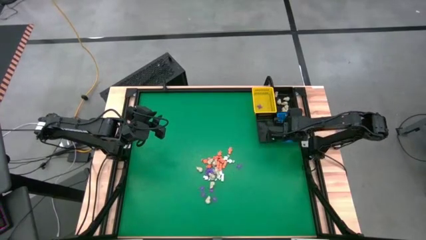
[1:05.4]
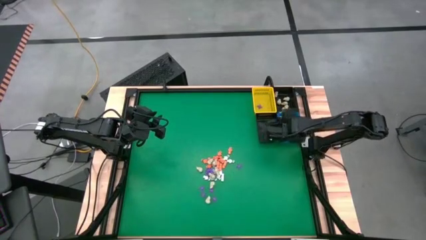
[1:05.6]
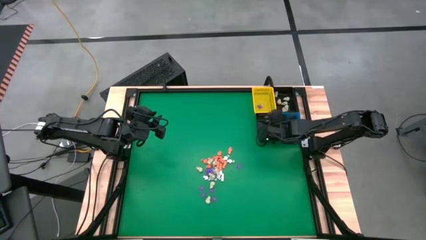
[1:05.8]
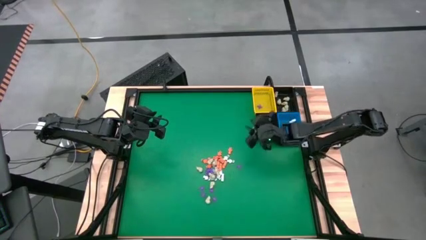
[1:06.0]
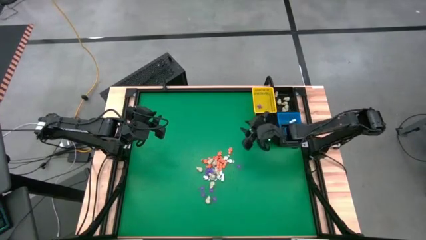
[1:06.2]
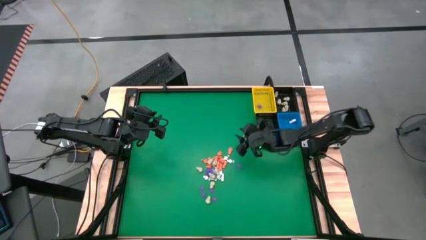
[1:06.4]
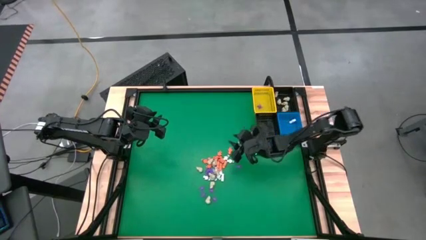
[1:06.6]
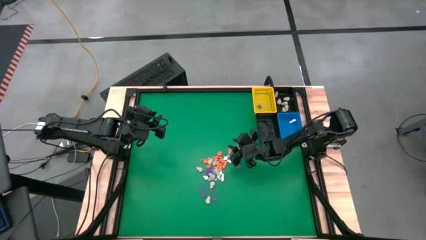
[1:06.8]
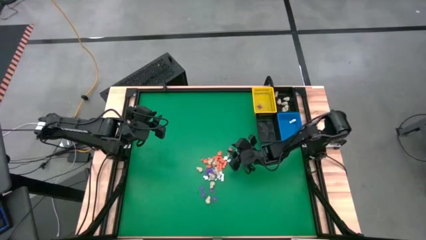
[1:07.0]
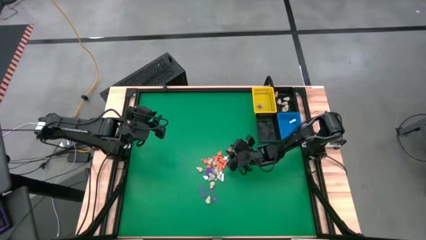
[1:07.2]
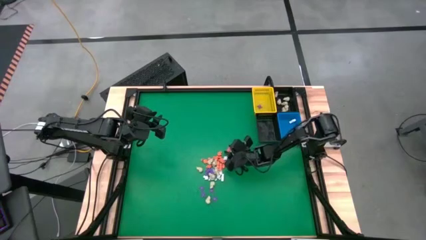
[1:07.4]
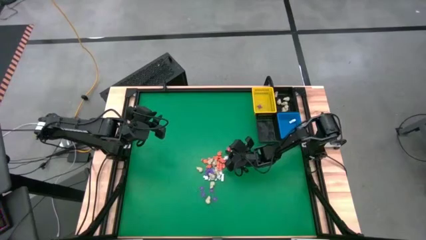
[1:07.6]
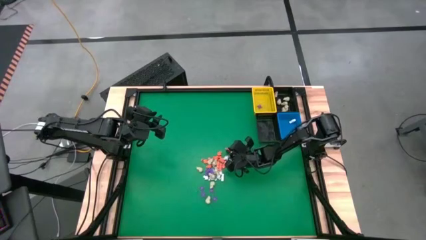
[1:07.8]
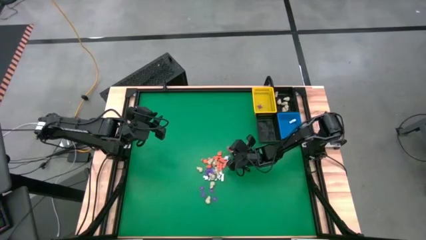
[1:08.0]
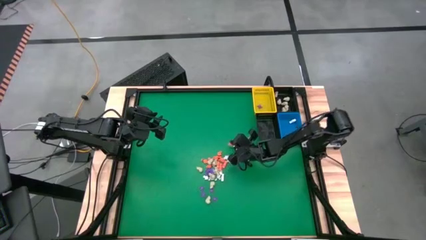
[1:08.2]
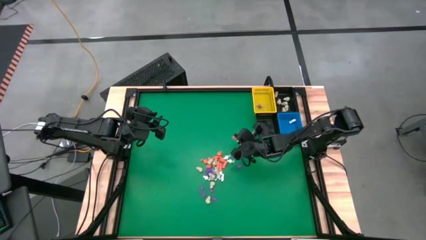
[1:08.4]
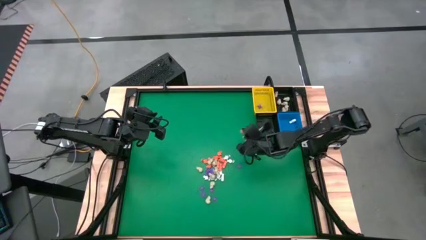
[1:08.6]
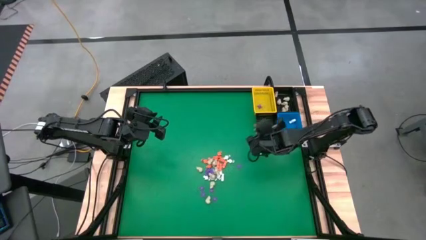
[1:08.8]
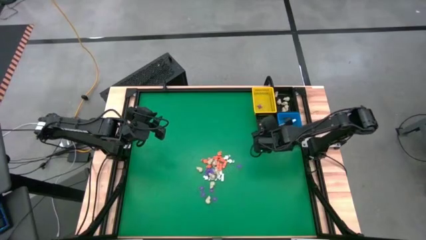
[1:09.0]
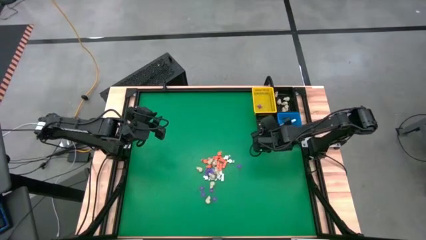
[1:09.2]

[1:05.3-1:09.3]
Task: Sort Halloween decoration
Put the orange skeleton toy into the bottom black basket

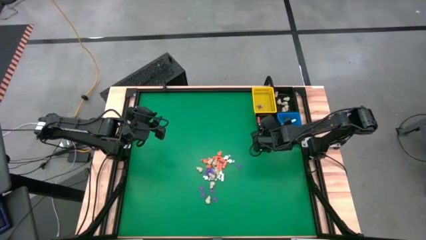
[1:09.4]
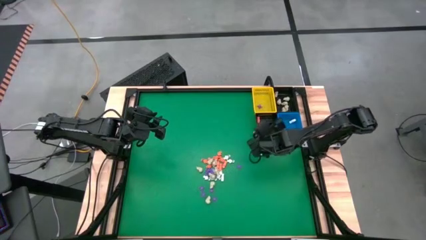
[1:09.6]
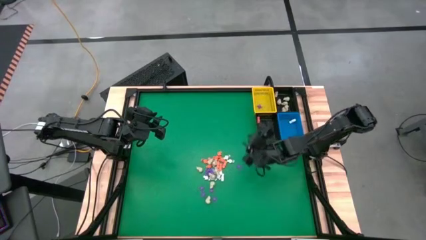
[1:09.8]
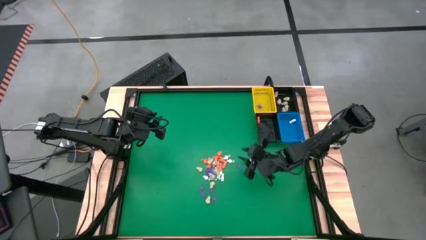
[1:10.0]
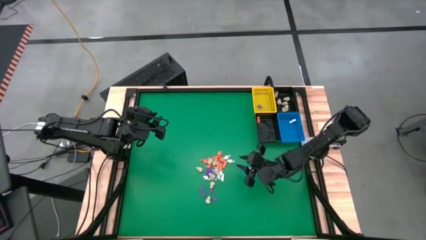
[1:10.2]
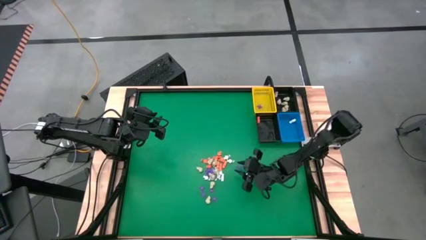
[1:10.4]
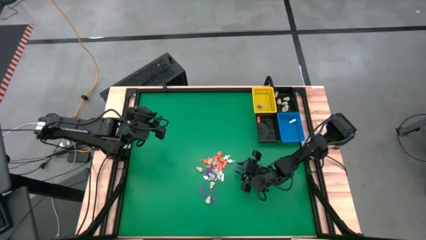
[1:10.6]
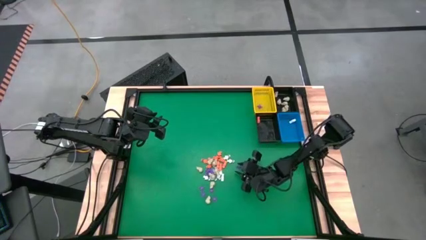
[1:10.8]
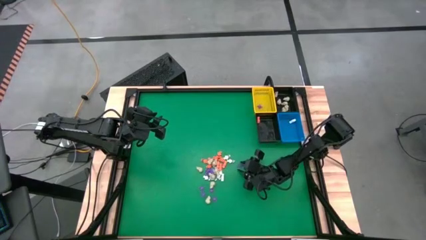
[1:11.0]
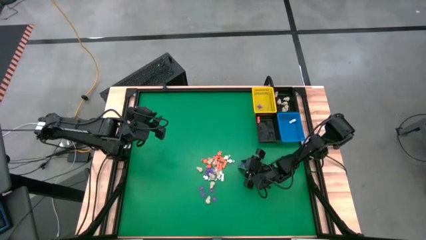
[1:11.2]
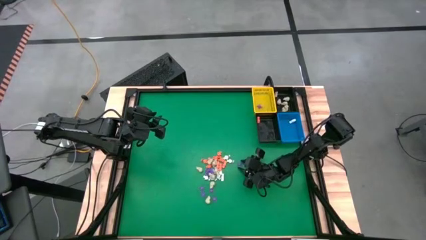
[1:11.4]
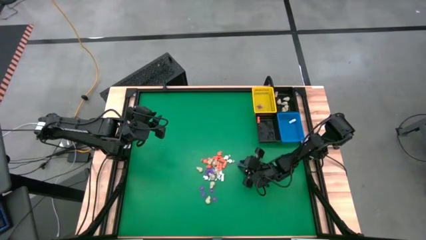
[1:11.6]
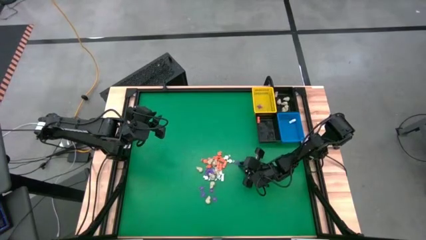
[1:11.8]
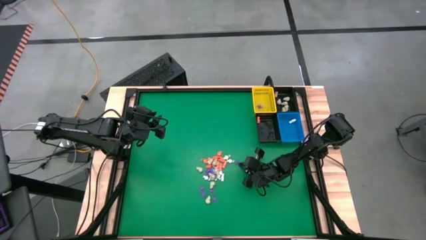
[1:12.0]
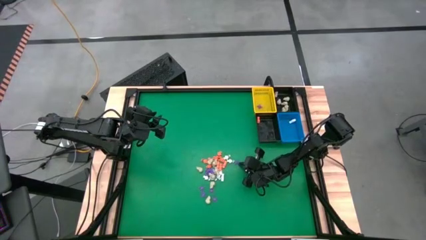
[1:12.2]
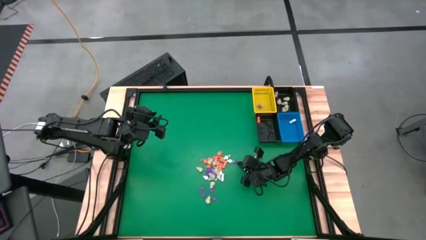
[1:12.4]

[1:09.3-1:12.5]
Put the purple spider toy into the yellow basket

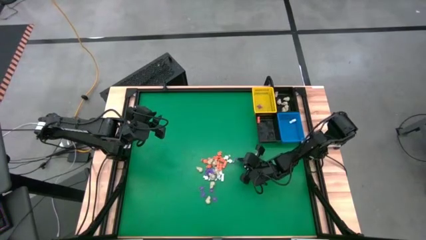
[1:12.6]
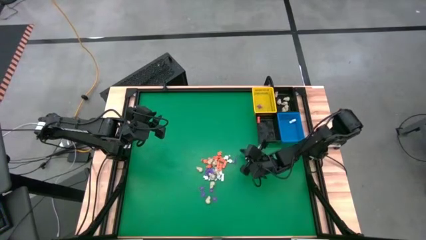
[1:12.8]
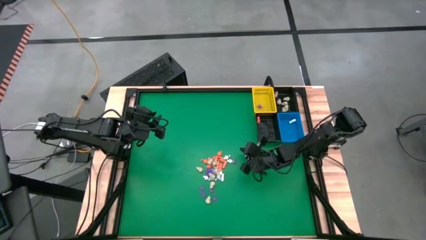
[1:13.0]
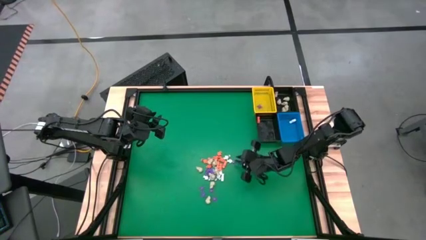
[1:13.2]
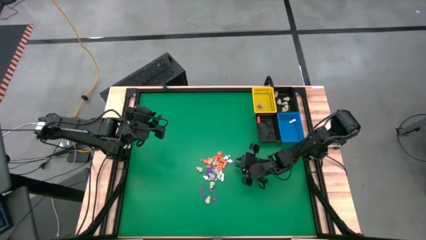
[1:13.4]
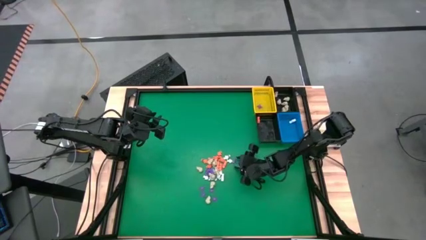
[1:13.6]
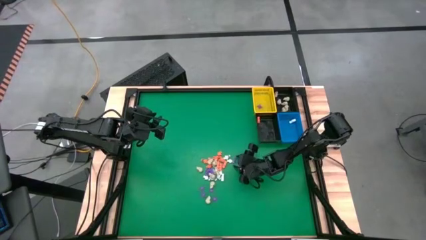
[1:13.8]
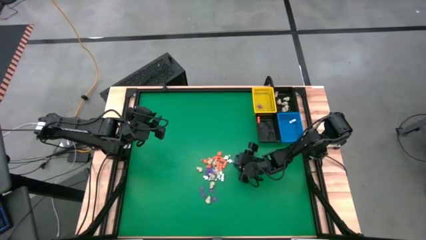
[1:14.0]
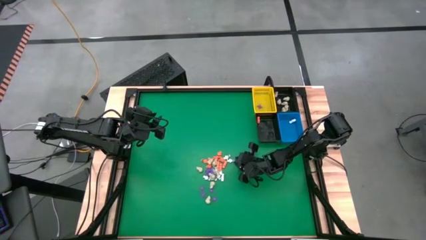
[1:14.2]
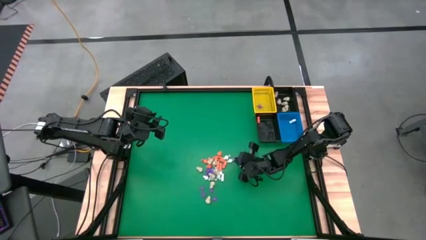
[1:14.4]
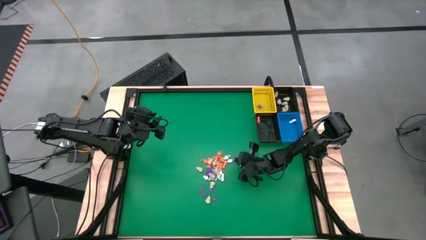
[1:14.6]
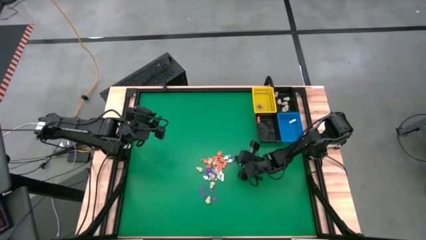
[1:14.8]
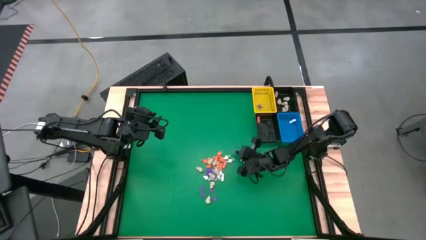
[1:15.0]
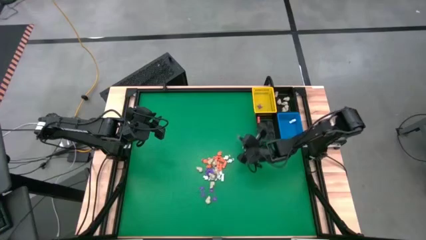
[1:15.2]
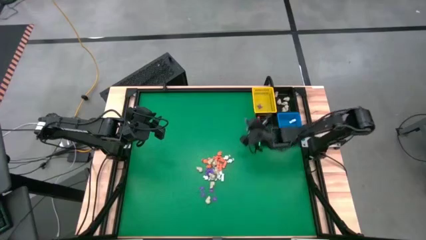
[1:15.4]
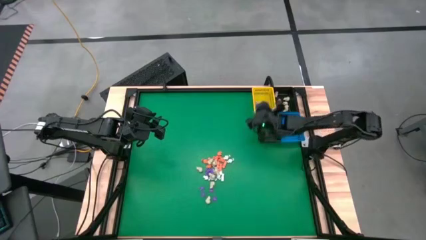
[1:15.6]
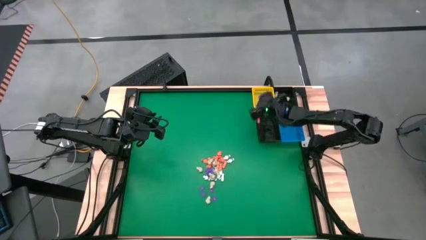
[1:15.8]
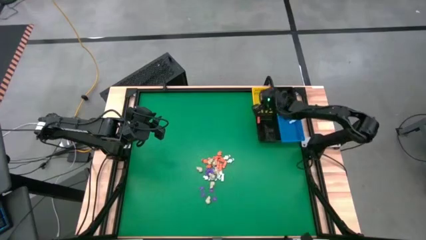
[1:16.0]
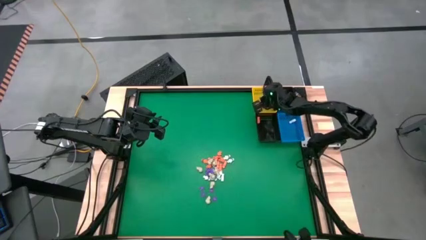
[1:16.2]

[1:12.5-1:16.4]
Put the purple spider toy into the yellow basket

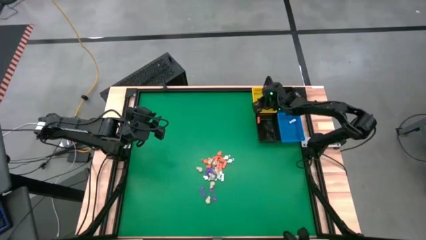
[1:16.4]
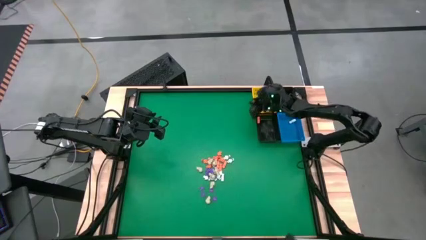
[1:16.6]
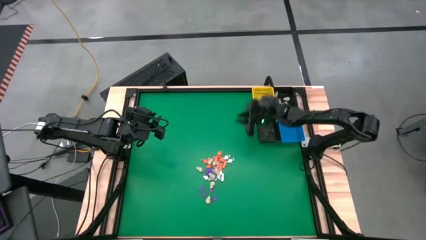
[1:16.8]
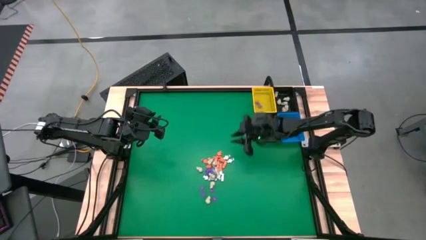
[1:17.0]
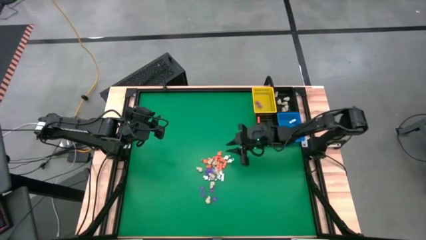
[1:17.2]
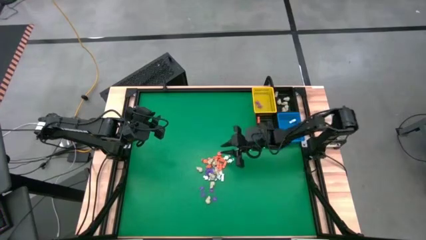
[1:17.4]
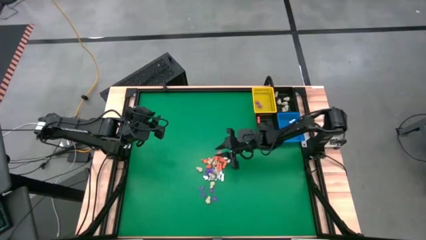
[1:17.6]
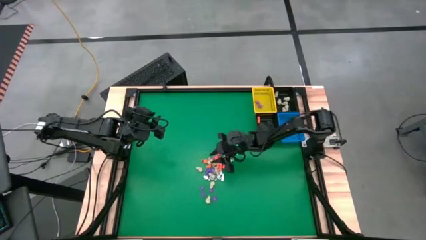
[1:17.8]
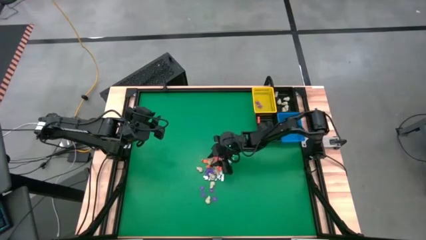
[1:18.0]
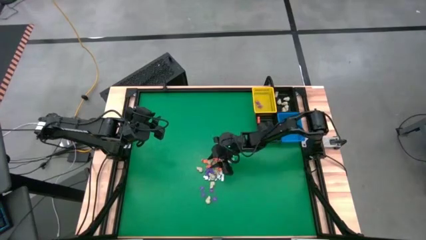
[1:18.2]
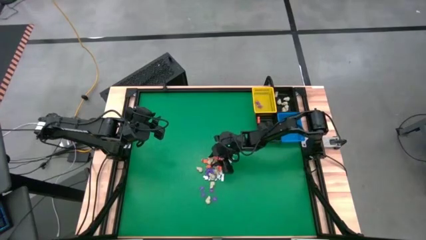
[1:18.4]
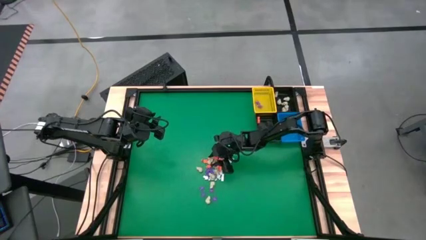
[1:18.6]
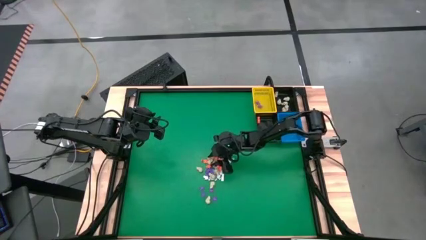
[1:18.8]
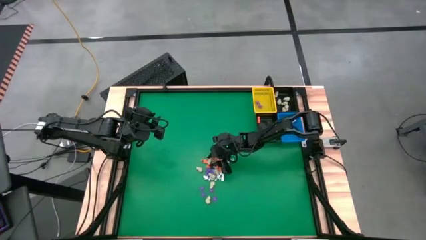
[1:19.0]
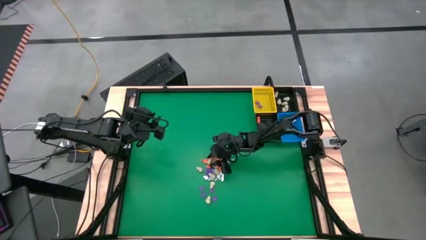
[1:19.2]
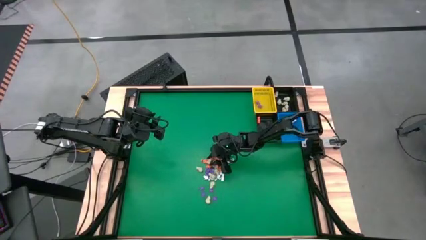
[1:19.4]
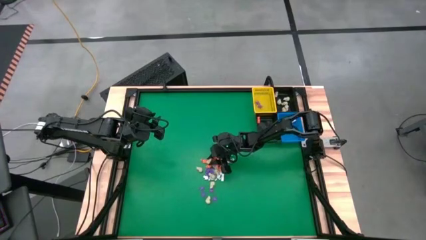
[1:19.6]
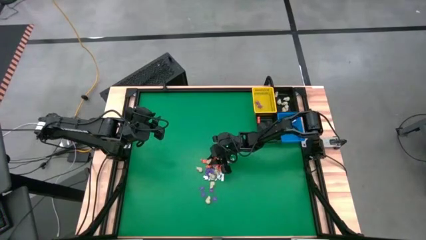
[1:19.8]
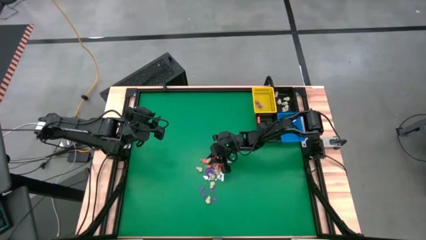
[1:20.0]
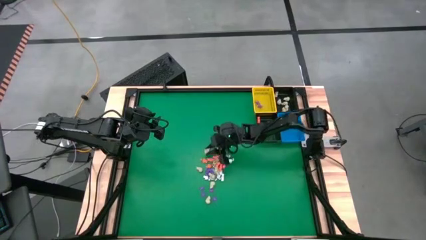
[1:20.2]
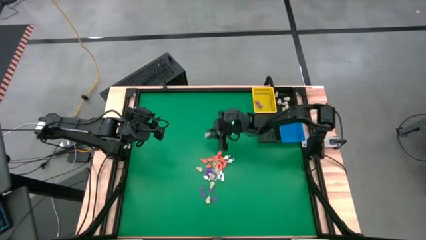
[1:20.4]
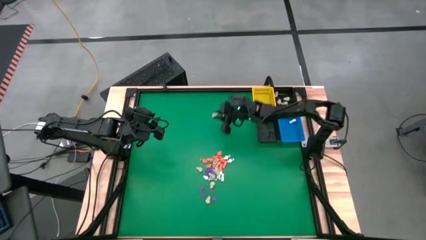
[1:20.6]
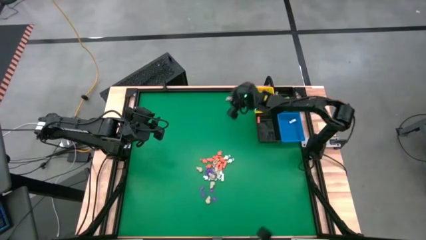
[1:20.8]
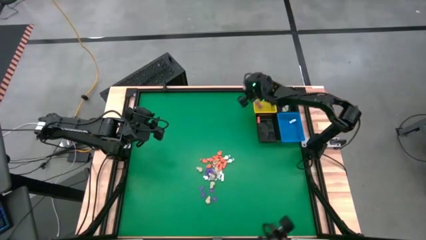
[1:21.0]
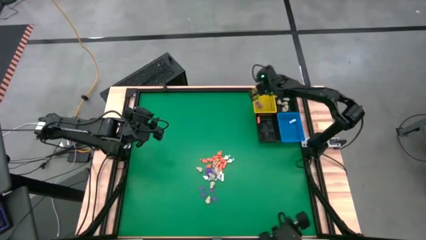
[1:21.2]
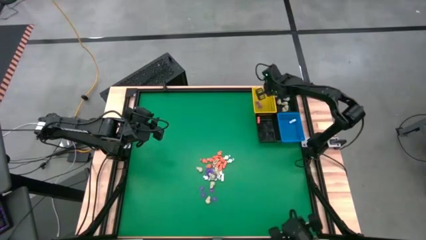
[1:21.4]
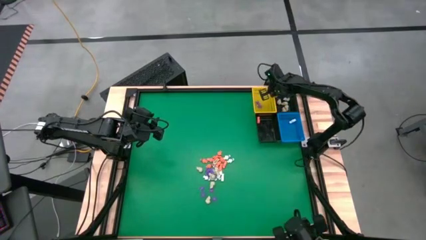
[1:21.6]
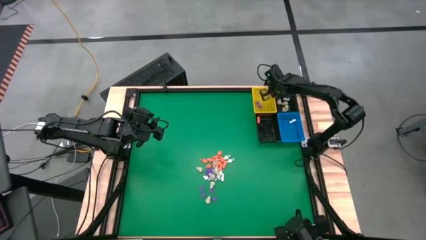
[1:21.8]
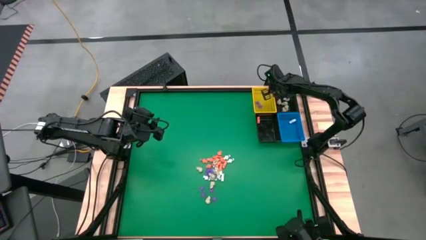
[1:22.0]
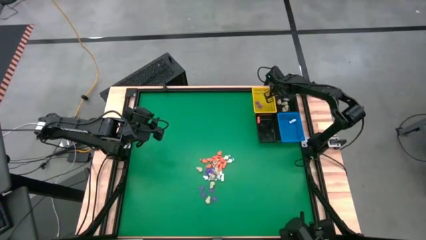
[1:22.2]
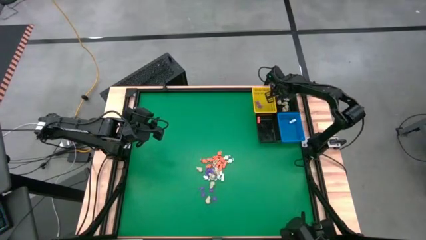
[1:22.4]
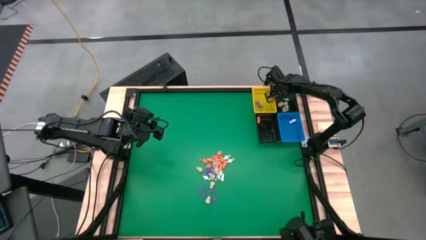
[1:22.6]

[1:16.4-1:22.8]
Put the gray skull toy into the top black basket
